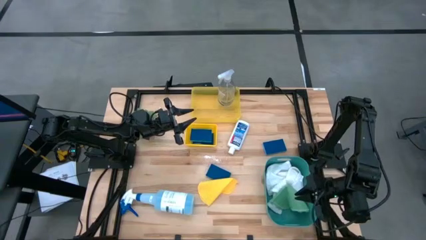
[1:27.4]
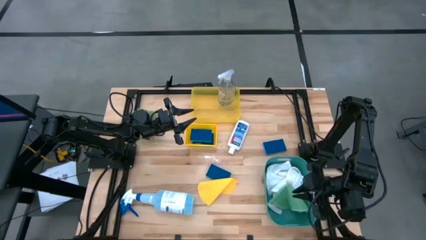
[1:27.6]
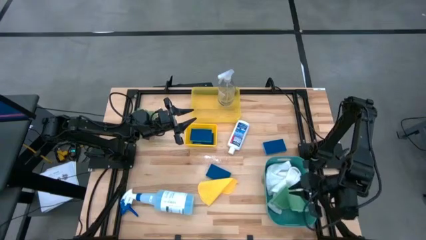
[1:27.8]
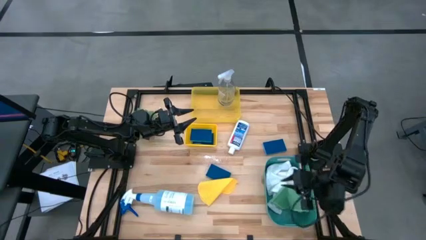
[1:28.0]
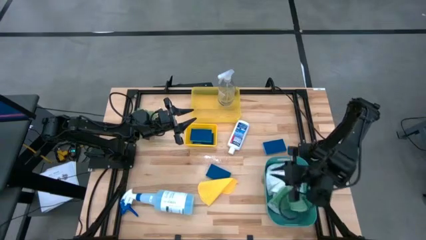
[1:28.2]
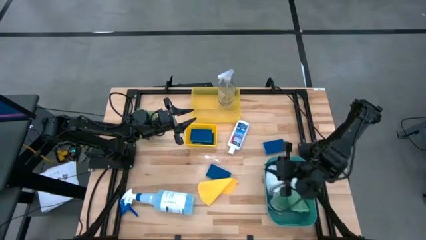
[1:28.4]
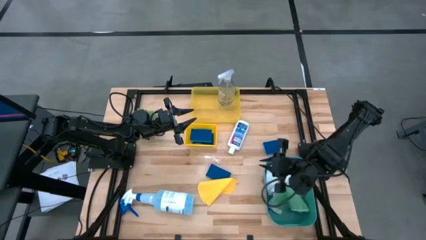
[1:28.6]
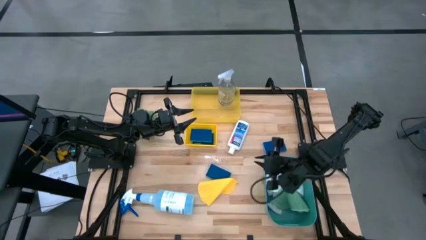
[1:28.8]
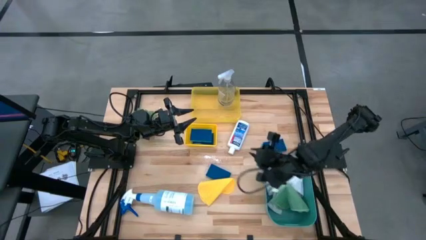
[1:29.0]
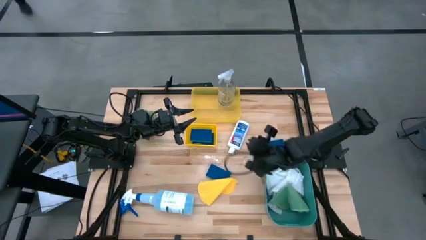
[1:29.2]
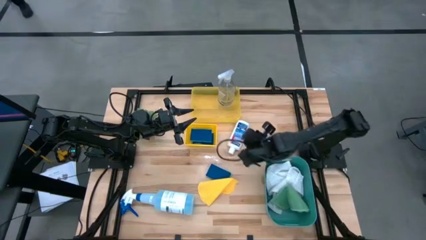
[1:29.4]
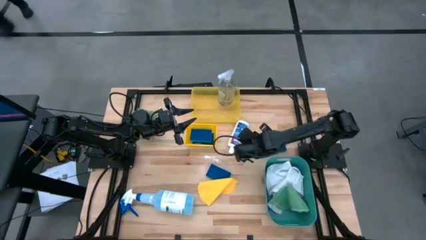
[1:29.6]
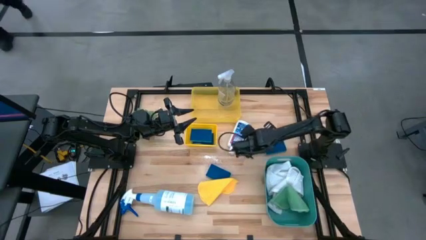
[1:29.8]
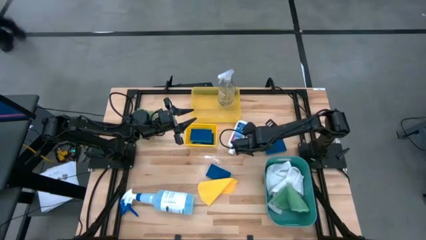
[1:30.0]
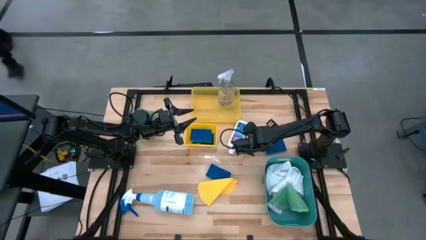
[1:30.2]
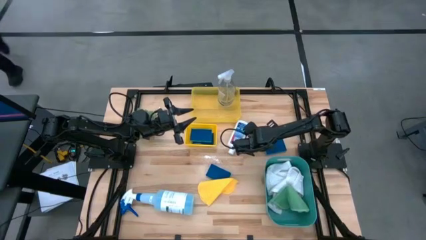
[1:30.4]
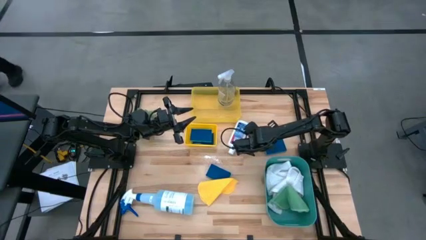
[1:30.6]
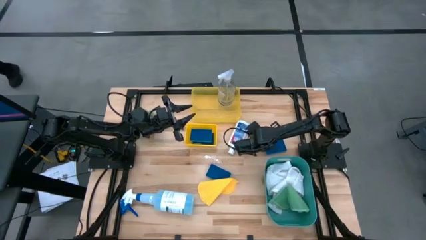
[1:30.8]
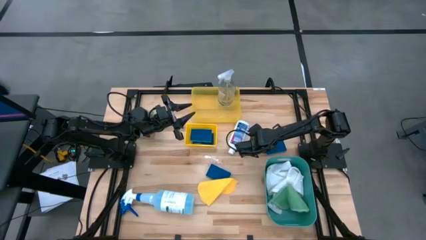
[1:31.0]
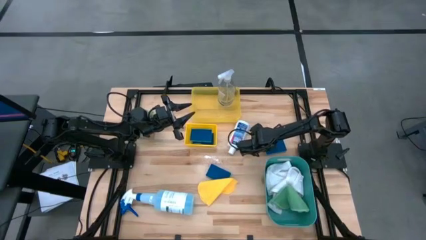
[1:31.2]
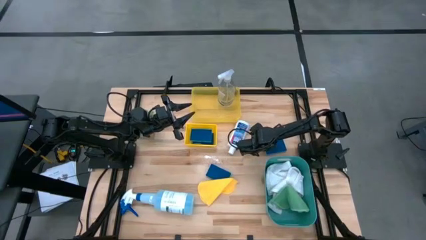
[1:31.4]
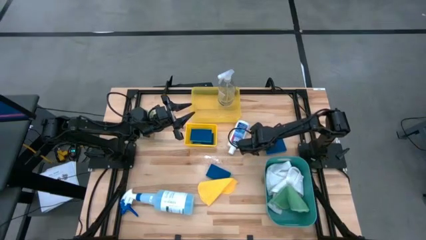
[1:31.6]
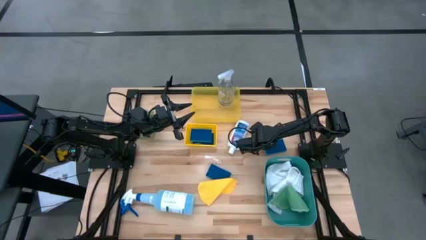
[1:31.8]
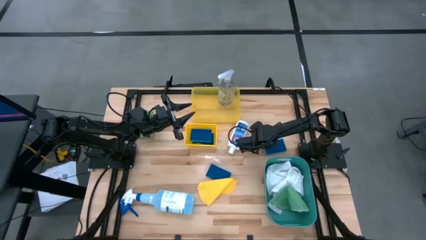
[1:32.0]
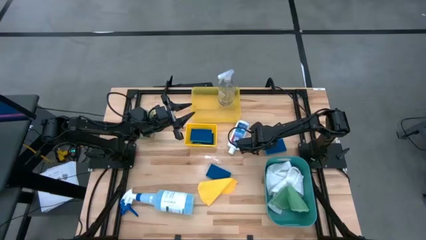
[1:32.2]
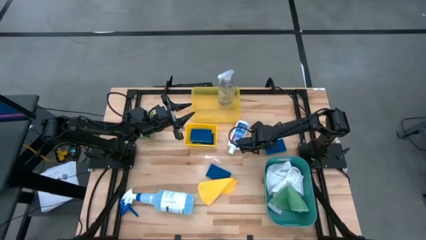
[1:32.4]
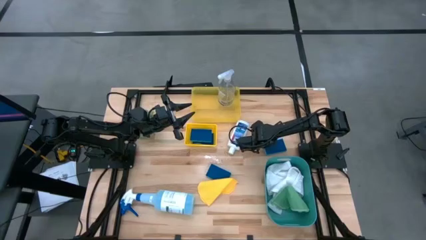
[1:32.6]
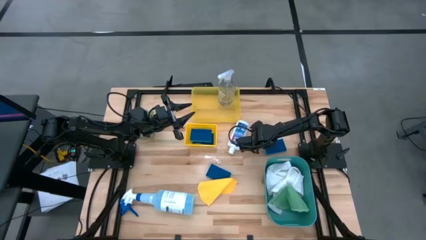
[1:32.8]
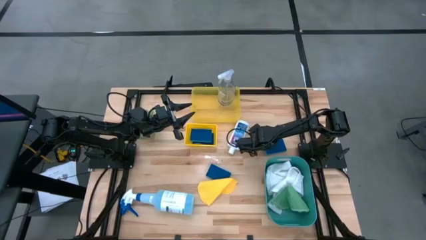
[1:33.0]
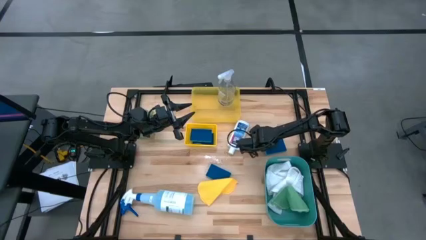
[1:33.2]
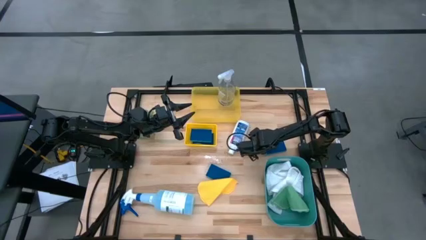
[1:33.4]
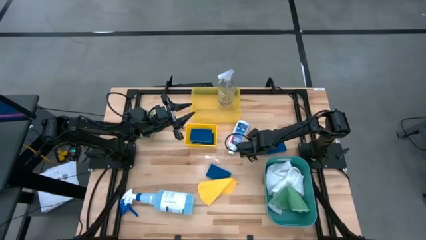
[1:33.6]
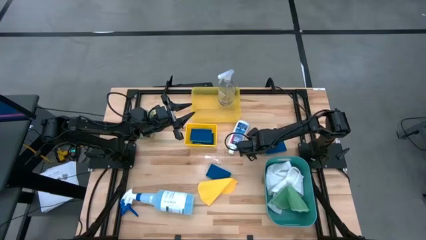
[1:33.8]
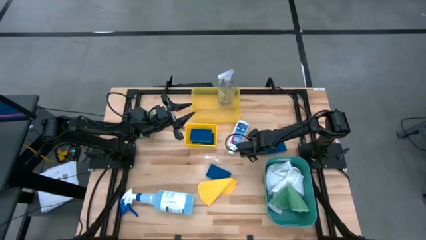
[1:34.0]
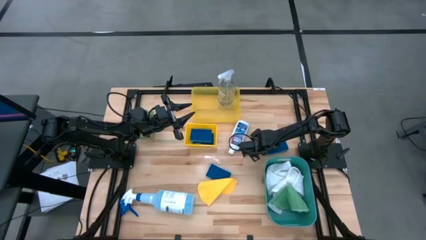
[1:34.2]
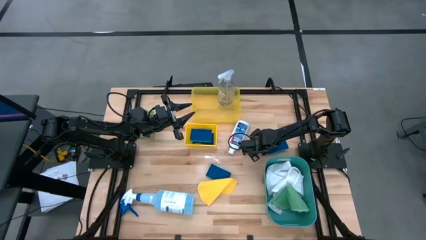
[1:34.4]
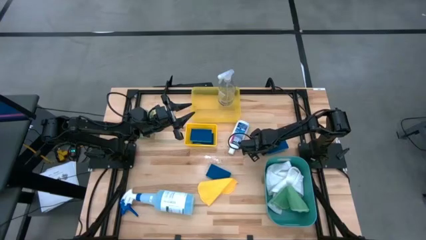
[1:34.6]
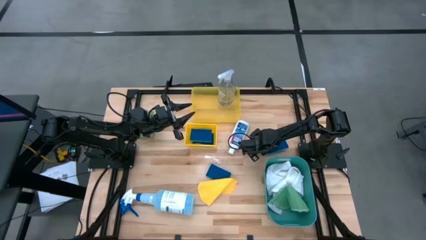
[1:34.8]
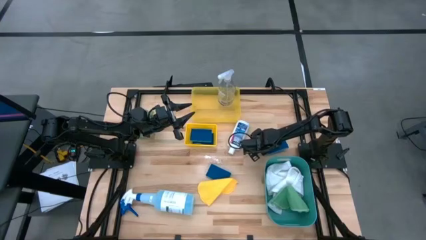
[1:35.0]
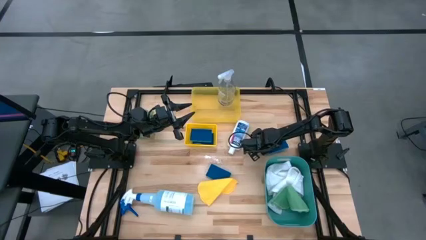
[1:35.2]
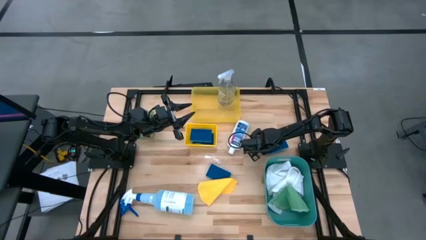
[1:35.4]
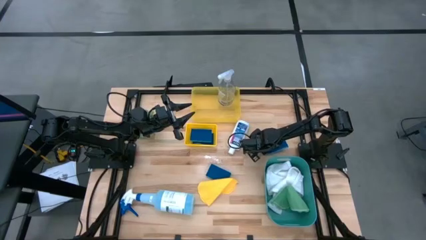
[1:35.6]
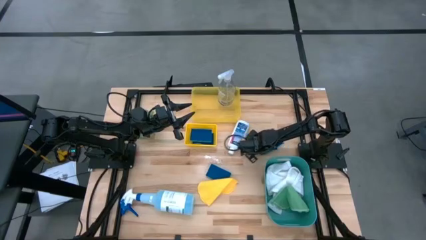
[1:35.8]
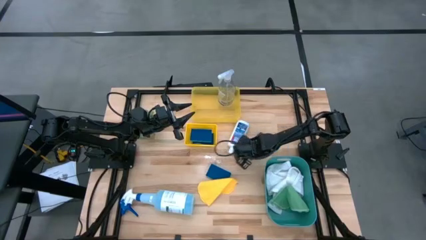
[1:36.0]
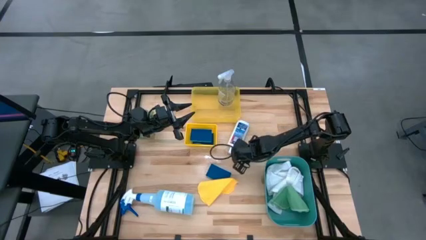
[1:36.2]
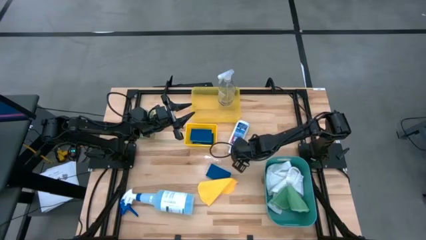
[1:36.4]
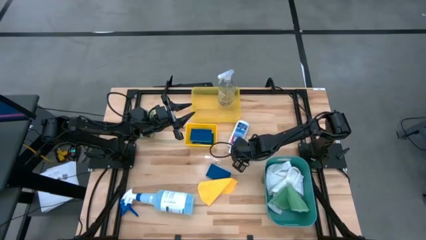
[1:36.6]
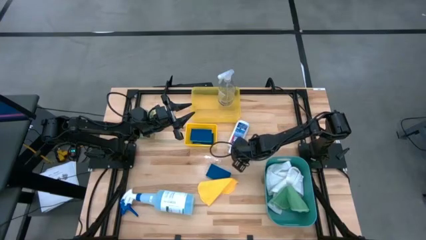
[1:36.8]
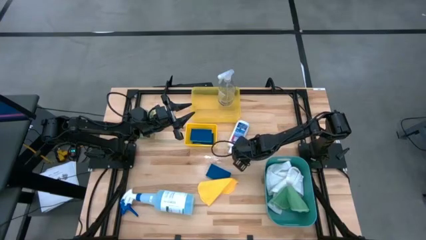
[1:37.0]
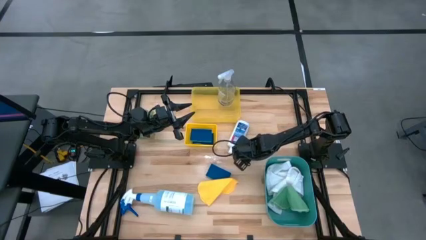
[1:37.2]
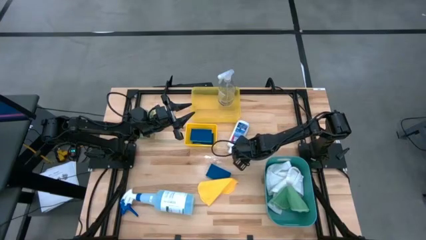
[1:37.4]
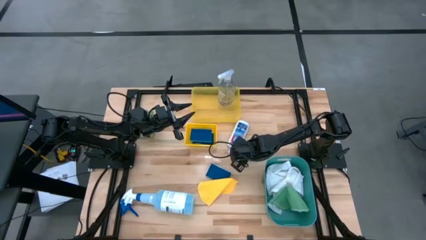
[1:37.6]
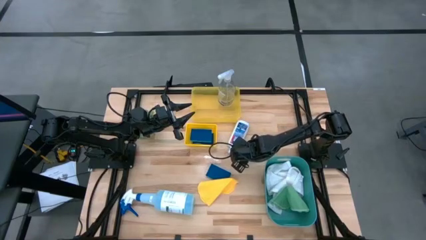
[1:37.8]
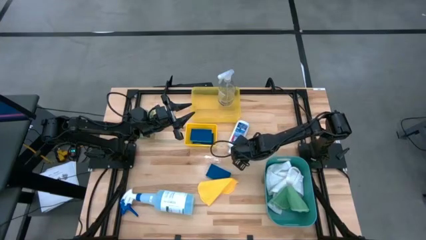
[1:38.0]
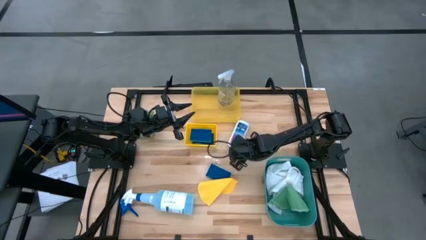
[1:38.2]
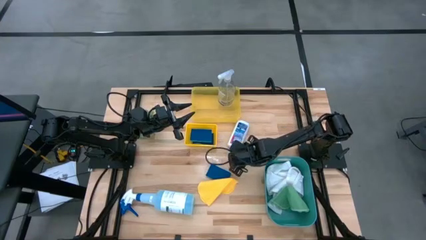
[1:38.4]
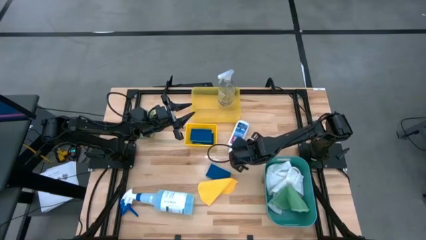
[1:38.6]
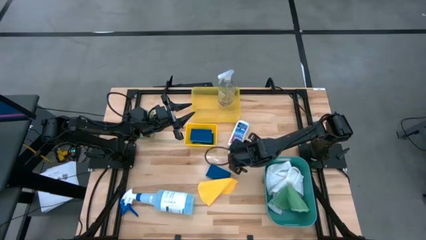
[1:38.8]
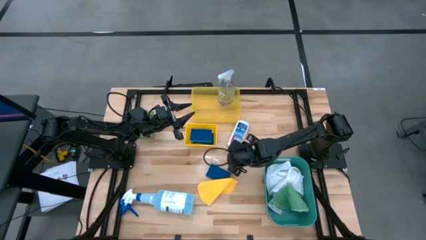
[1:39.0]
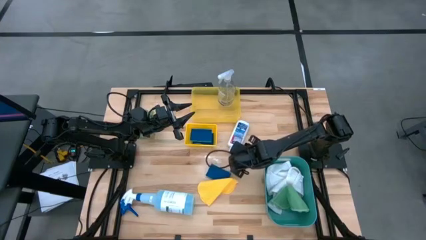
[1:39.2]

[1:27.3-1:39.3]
Task: Pick & Place Kitchen Items
Put the blue sponge into the bottom yellow bin
